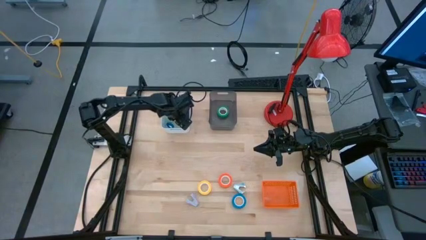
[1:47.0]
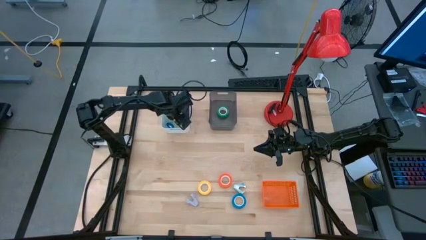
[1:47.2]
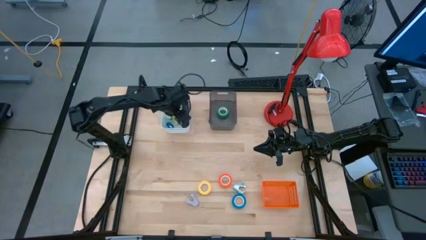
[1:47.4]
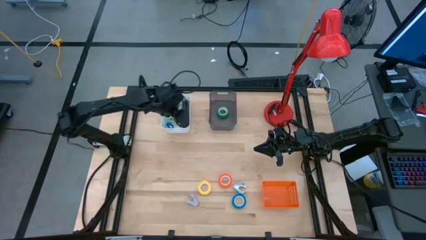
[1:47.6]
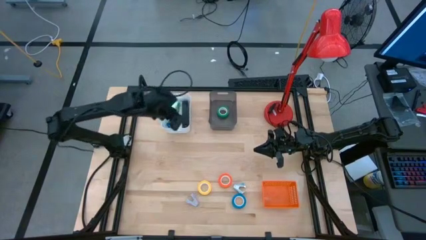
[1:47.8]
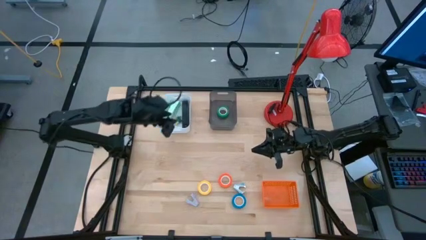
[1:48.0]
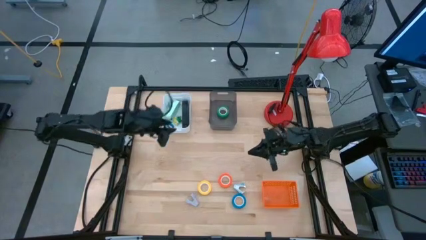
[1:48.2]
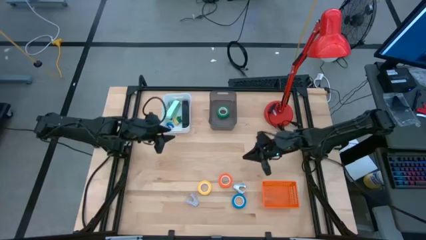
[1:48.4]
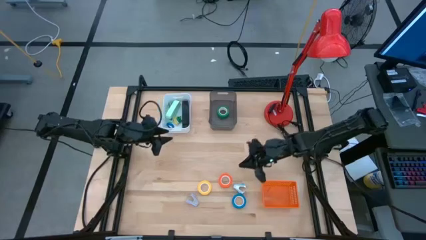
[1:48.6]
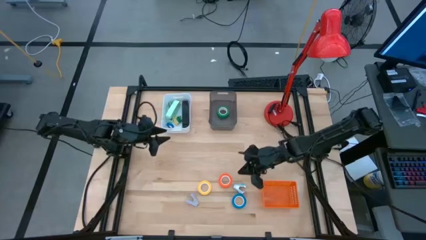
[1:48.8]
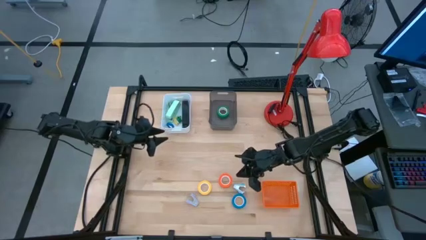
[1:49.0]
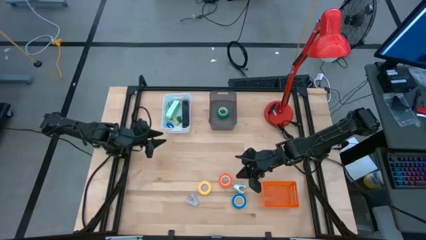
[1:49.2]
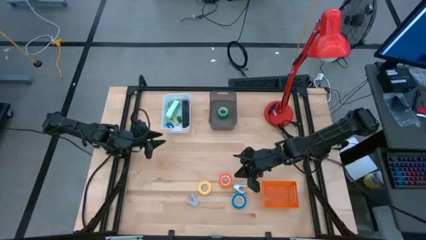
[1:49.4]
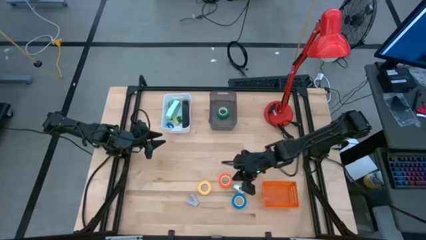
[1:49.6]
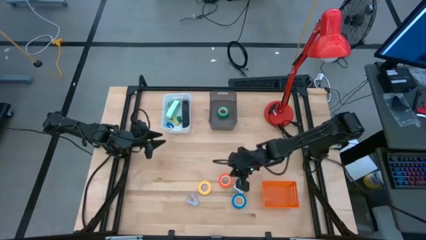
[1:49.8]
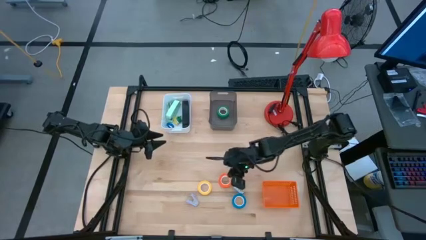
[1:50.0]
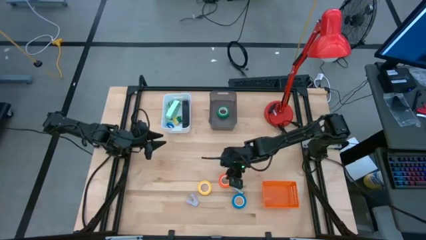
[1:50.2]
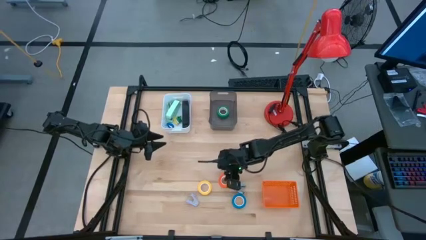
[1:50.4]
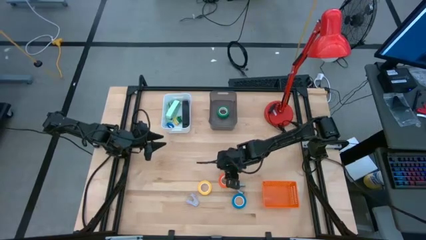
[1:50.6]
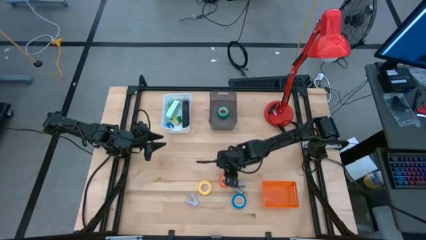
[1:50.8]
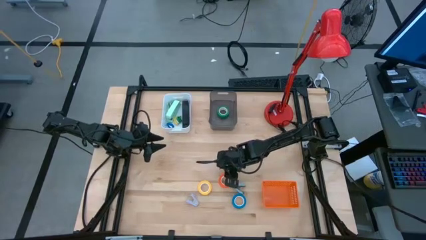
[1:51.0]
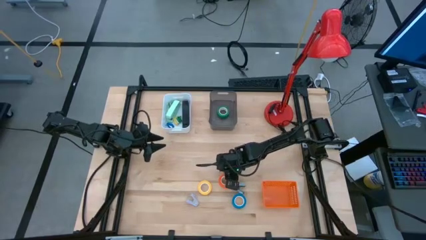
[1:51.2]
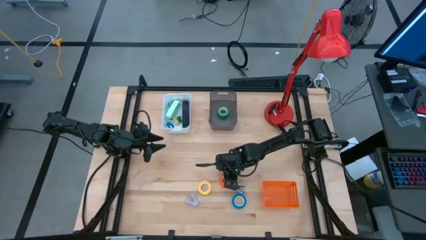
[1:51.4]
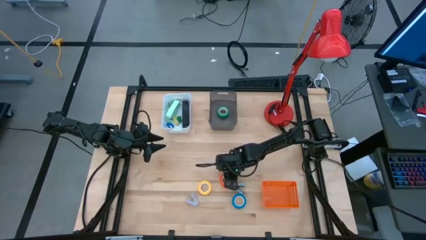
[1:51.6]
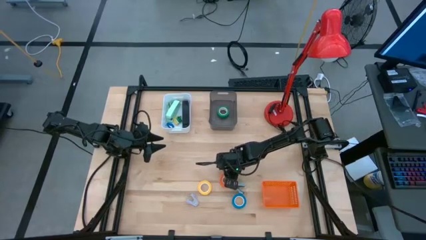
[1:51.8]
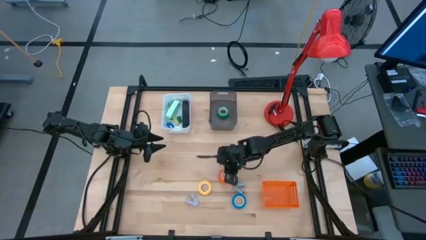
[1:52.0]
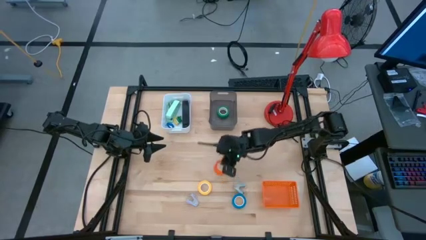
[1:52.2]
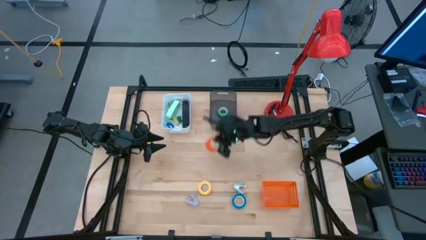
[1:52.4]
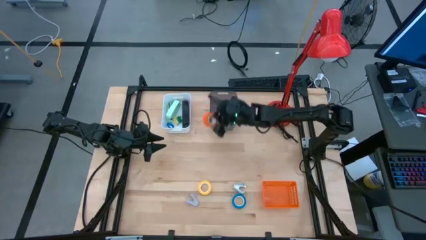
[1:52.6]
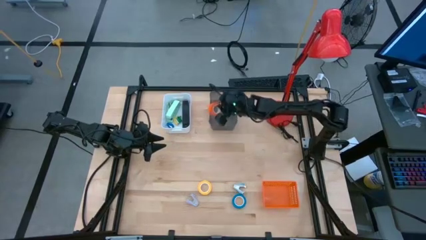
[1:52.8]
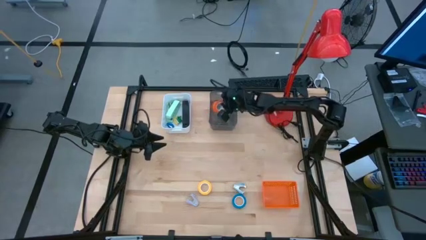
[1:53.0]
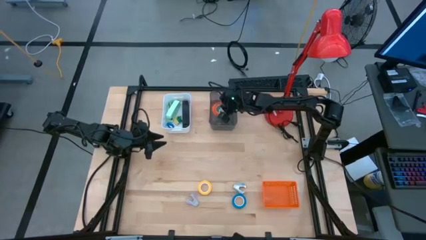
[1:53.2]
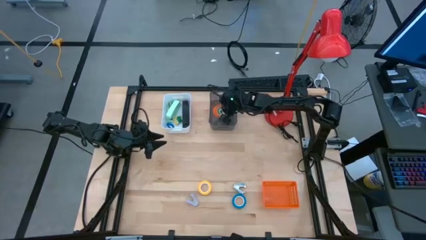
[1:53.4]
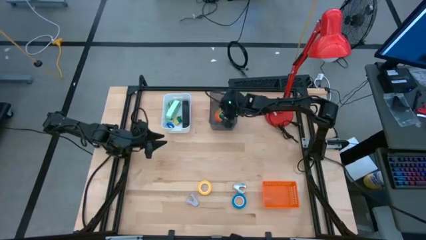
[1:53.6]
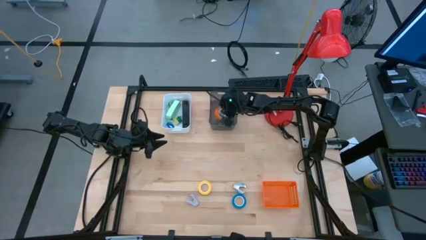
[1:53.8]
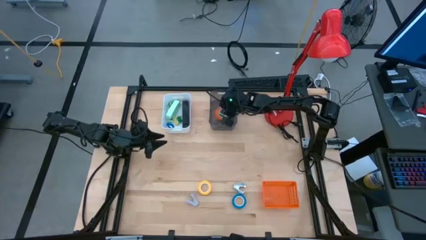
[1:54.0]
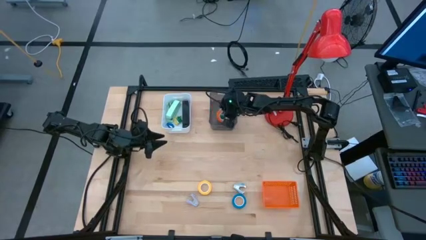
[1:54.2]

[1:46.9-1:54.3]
Task: Pick and place Stapler, Stapler remover, tape
Put the orange tape into the black bin

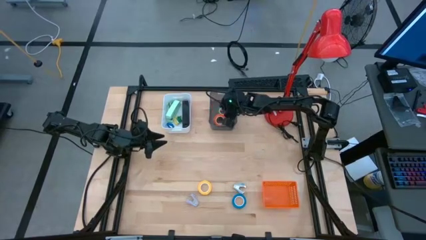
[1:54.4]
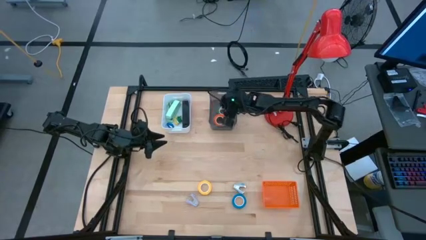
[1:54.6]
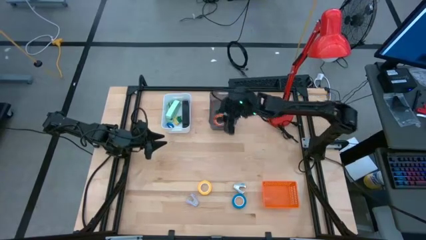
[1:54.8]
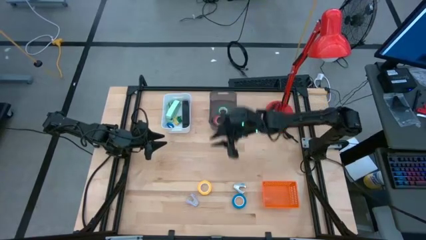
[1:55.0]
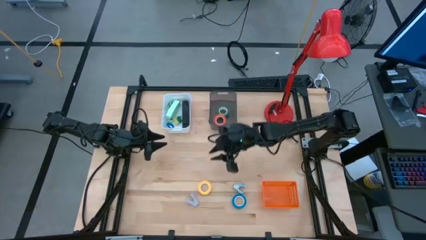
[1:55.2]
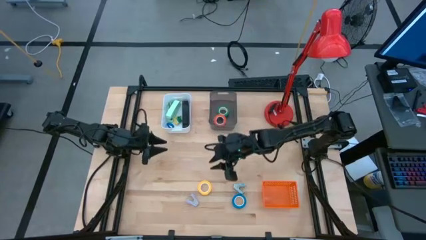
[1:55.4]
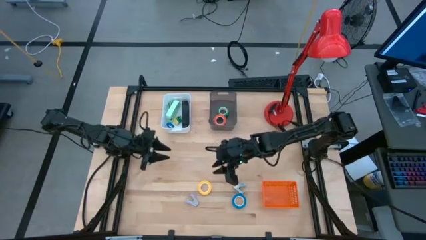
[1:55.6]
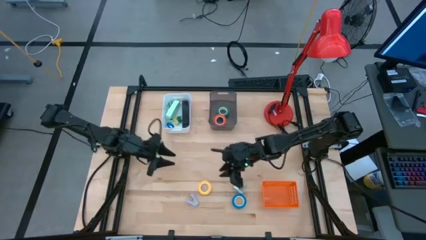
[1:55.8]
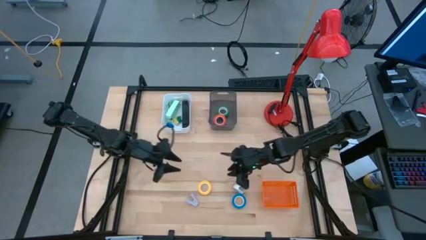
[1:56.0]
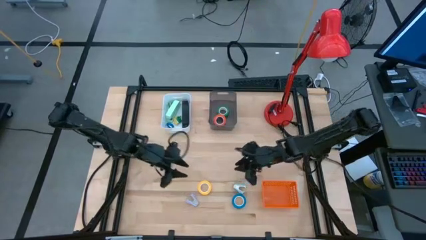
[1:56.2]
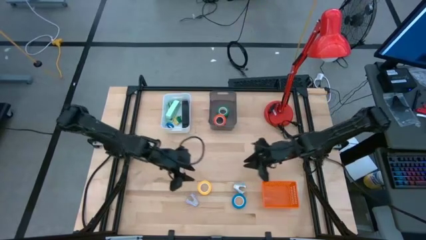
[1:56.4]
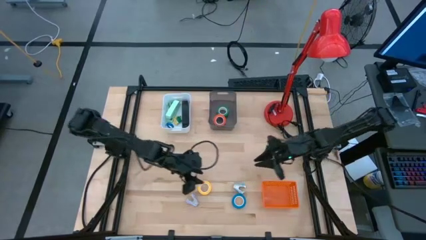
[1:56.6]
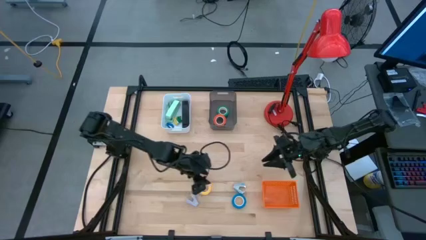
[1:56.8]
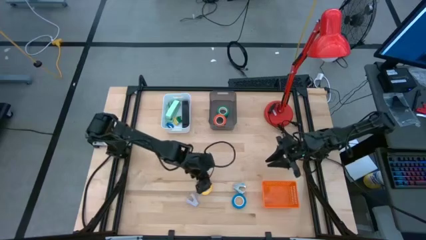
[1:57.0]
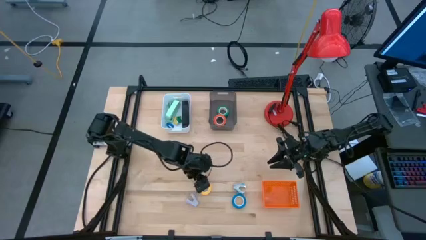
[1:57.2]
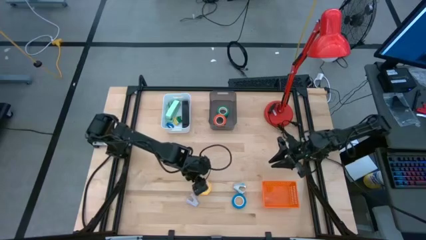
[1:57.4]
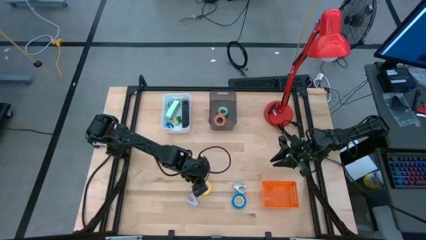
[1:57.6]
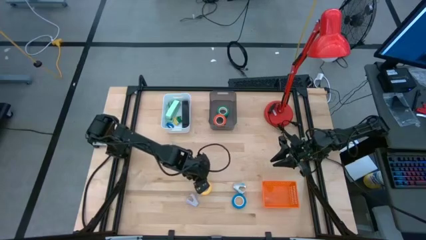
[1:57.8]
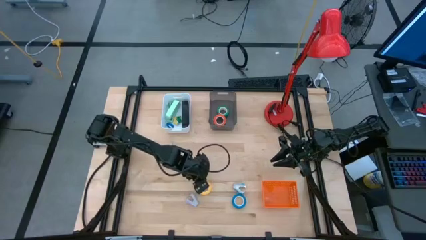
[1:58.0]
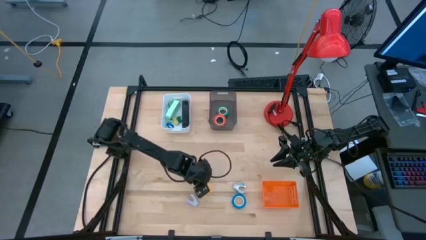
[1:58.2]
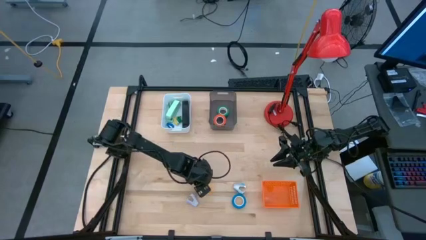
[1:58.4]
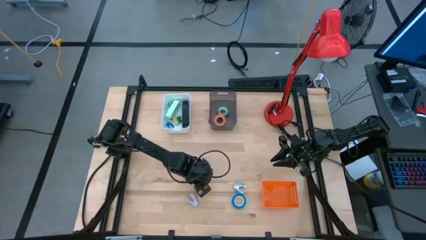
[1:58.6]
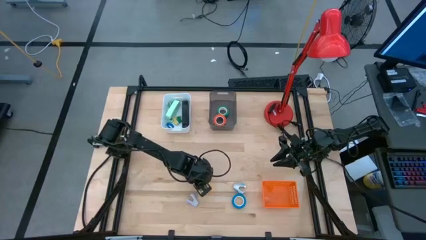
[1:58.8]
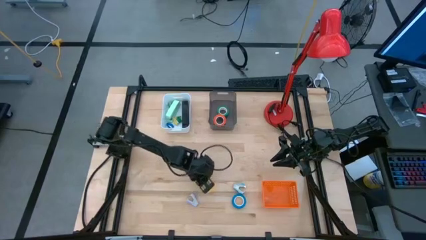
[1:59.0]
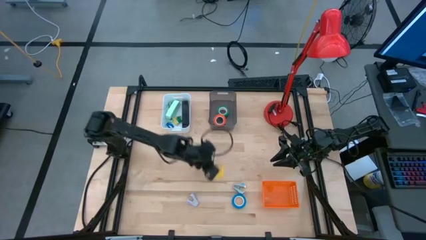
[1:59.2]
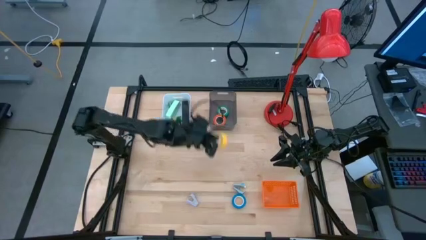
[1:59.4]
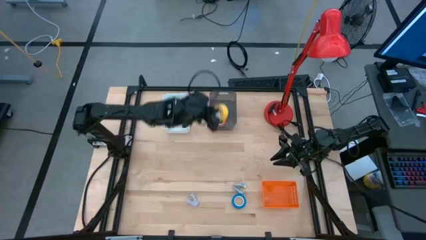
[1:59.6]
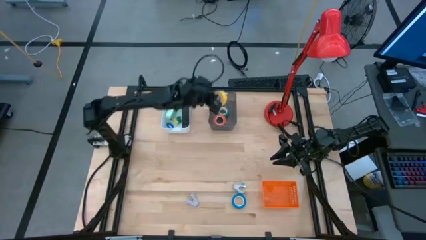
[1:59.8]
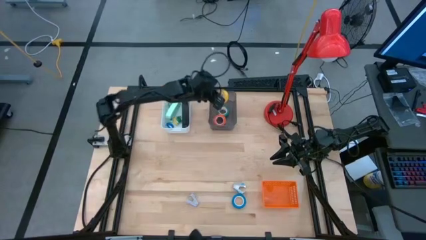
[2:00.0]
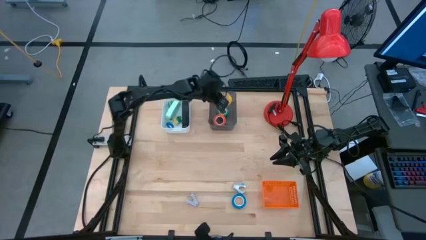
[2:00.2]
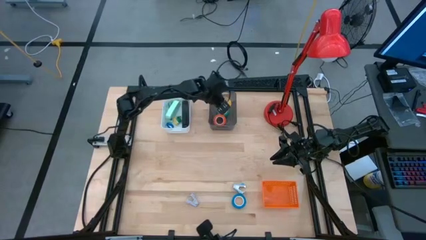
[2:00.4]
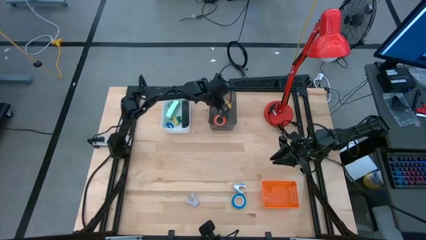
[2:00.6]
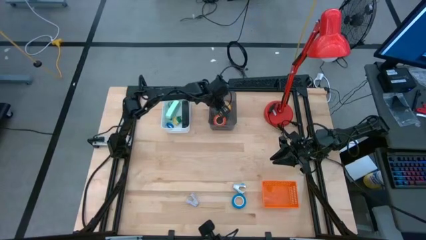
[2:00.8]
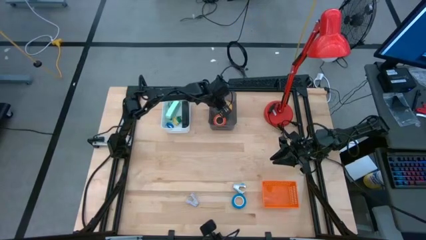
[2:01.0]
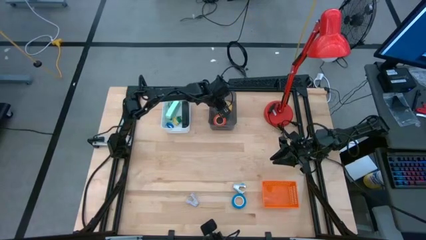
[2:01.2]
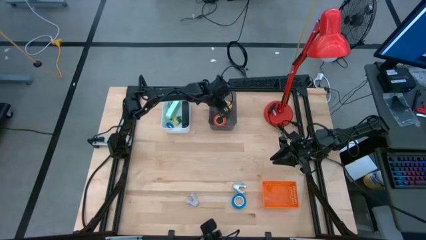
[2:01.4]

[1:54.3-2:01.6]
Put the yellow tape into the black bin

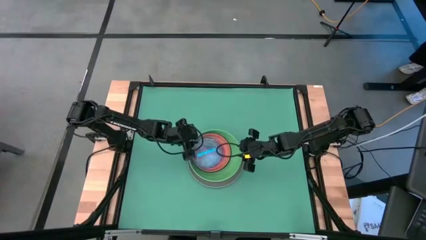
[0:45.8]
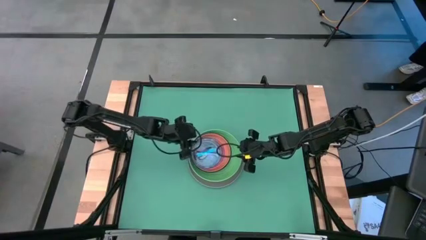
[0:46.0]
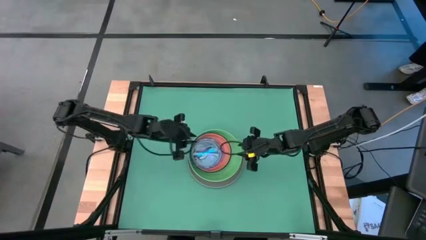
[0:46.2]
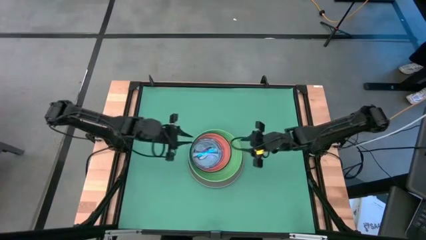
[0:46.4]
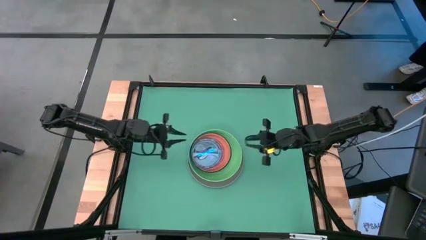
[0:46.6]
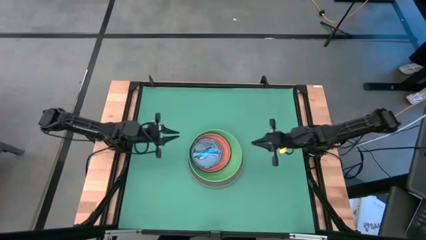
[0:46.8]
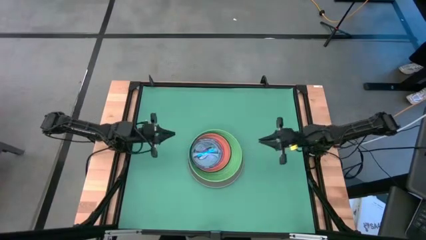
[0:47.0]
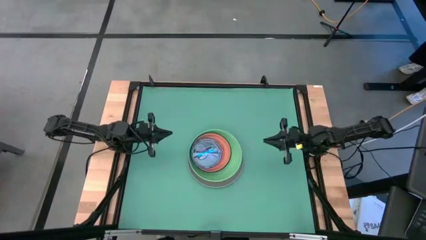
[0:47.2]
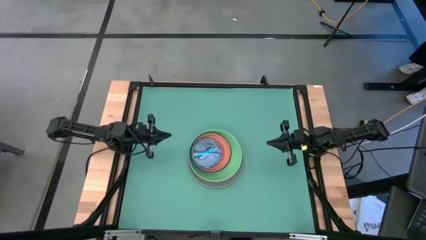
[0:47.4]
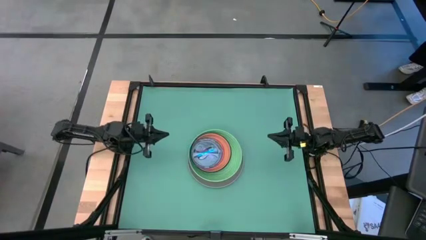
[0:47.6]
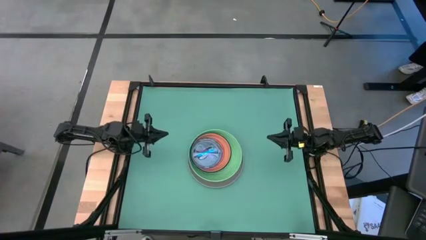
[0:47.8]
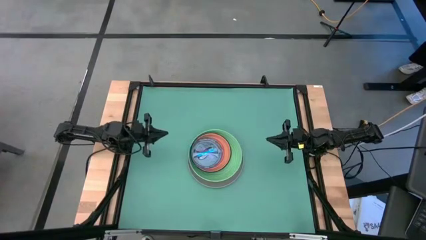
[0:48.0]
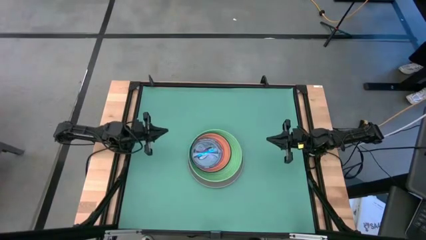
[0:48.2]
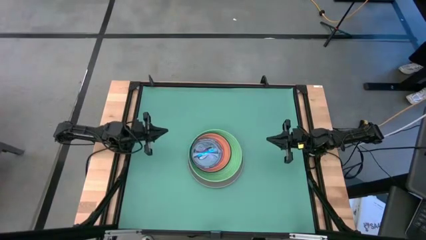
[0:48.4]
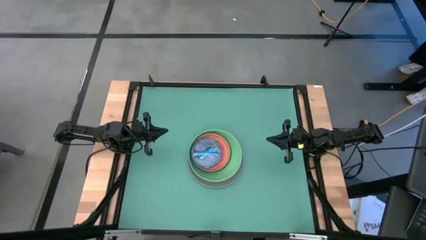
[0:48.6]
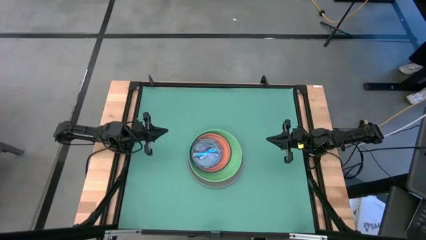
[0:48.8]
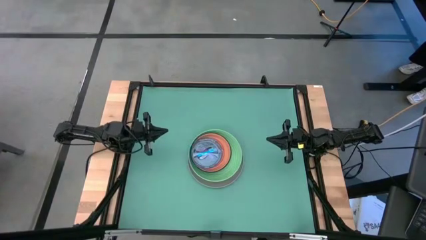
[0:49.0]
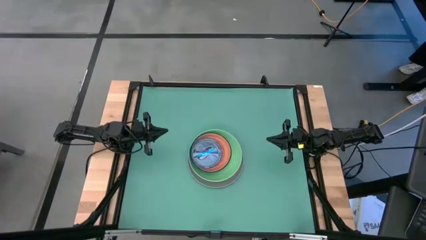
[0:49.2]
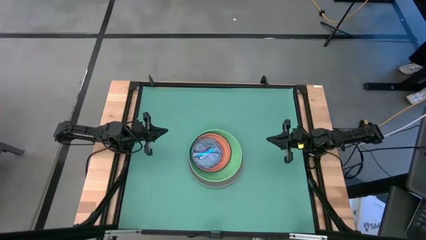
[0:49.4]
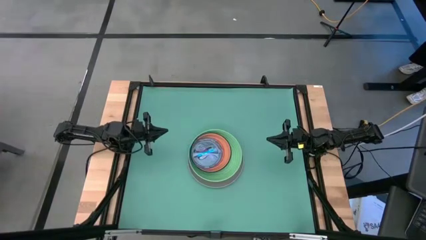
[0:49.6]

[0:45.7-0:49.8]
Task: Stack plastic plates
Return to Home Position
